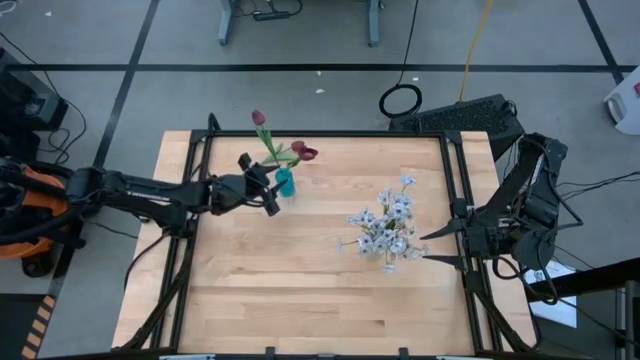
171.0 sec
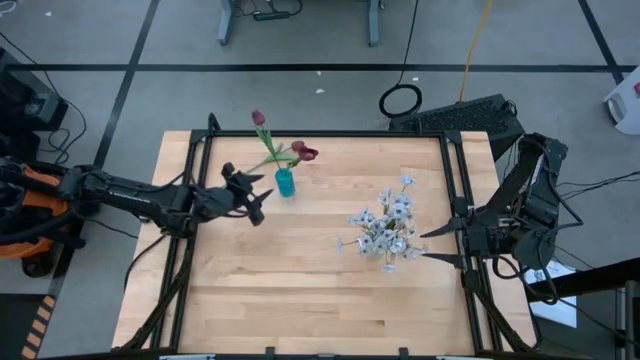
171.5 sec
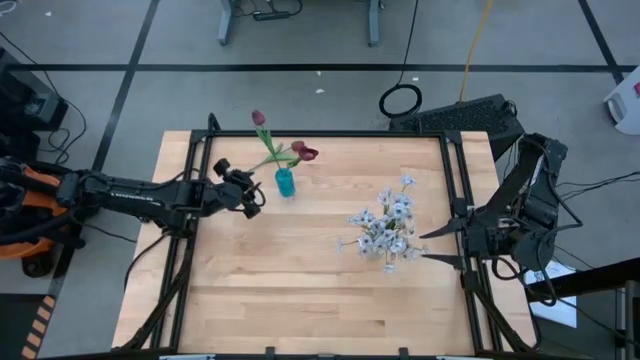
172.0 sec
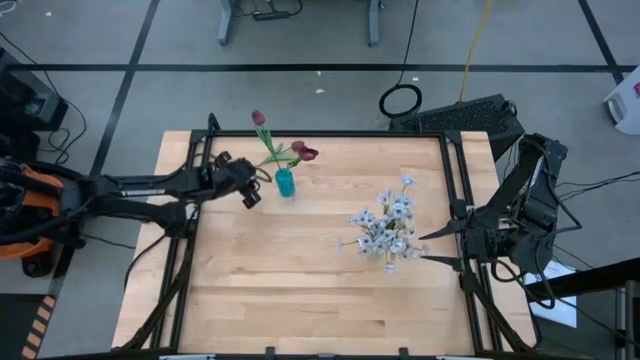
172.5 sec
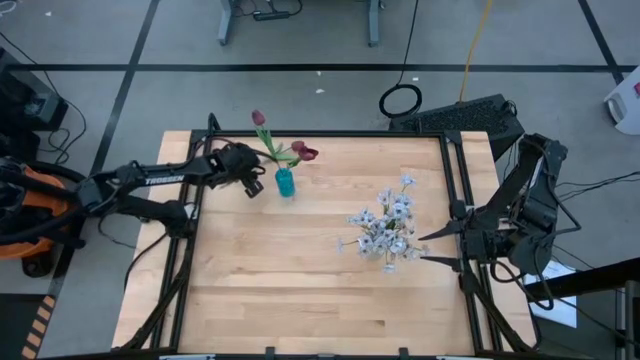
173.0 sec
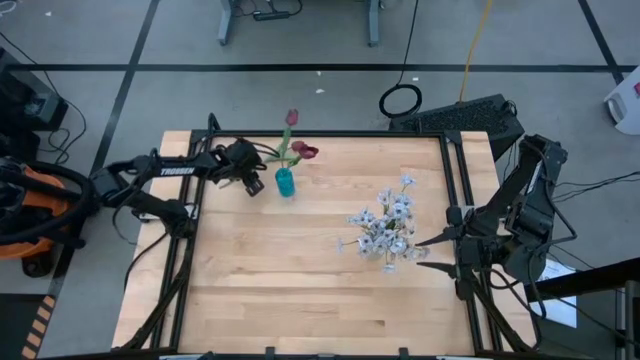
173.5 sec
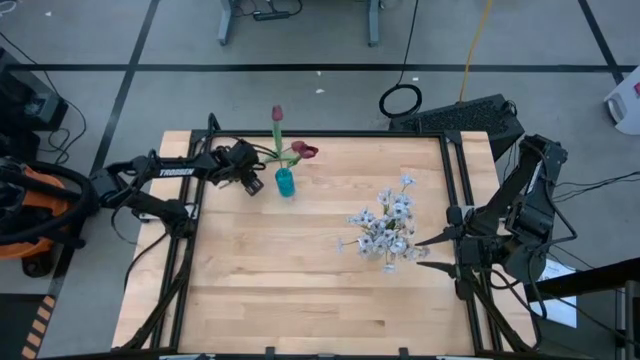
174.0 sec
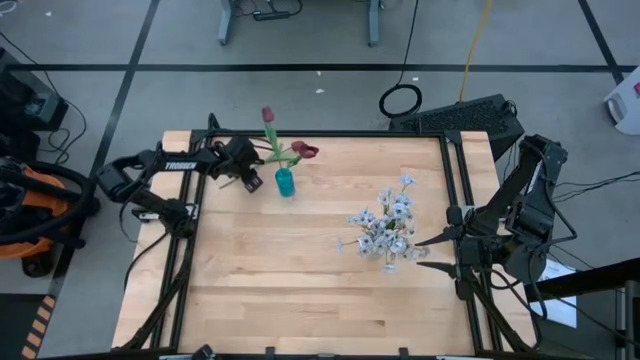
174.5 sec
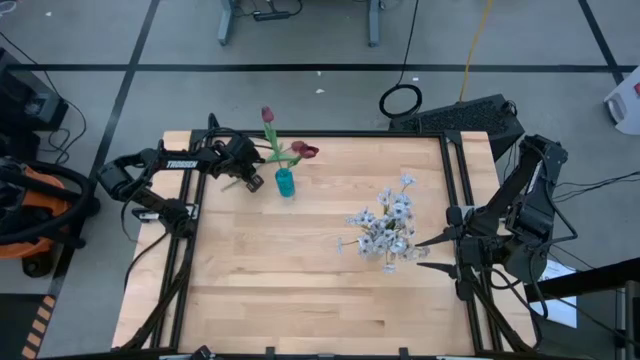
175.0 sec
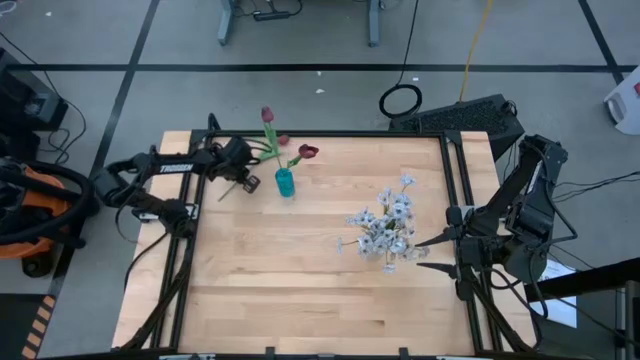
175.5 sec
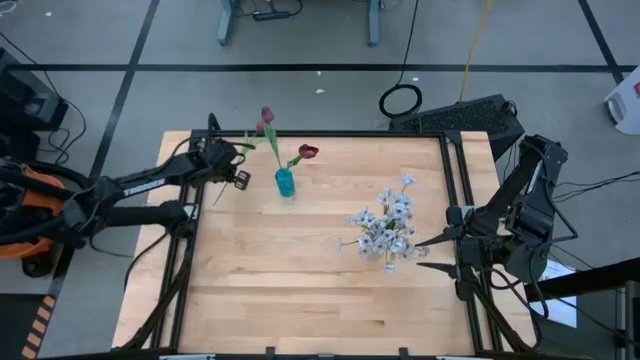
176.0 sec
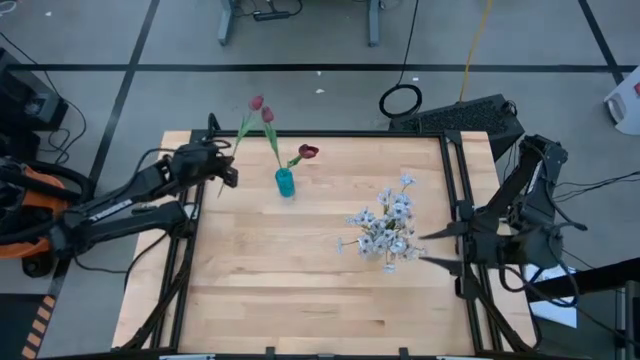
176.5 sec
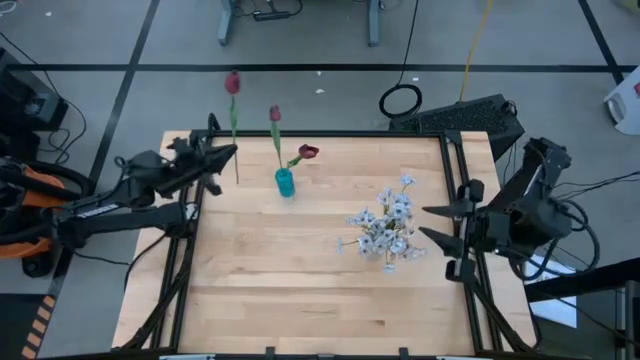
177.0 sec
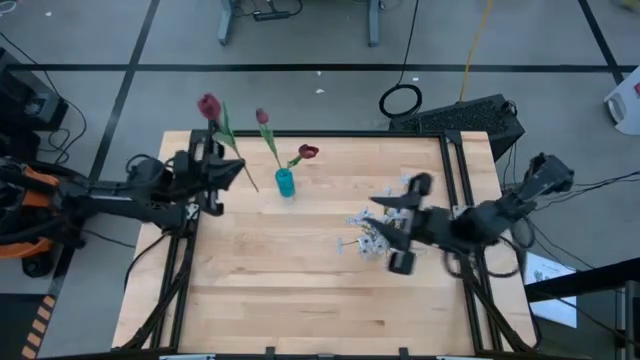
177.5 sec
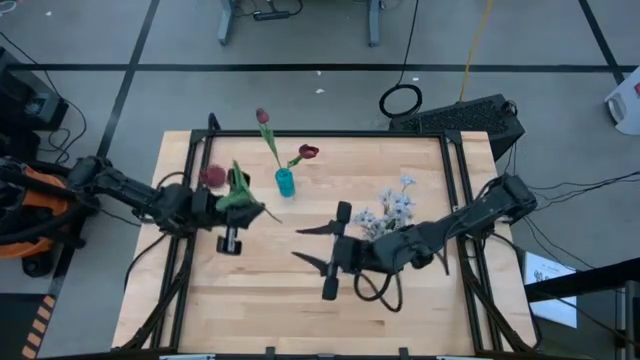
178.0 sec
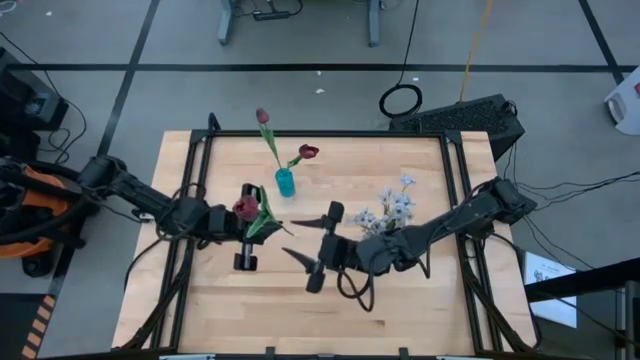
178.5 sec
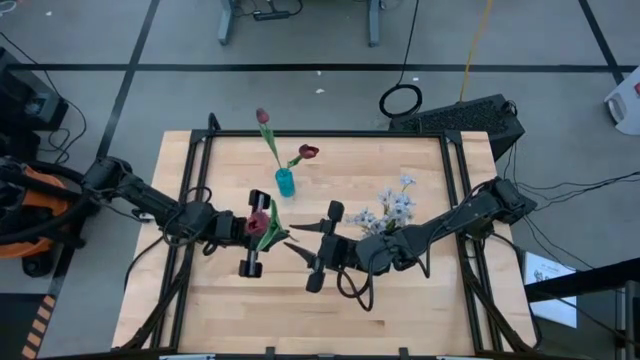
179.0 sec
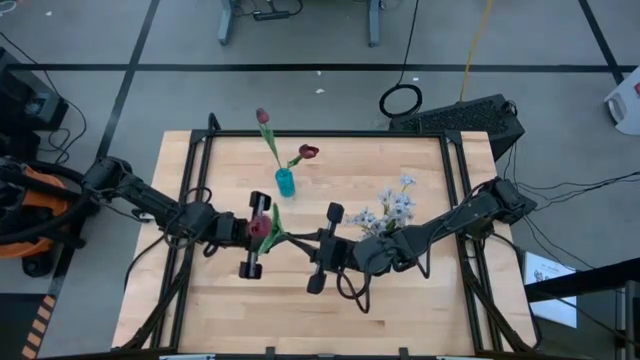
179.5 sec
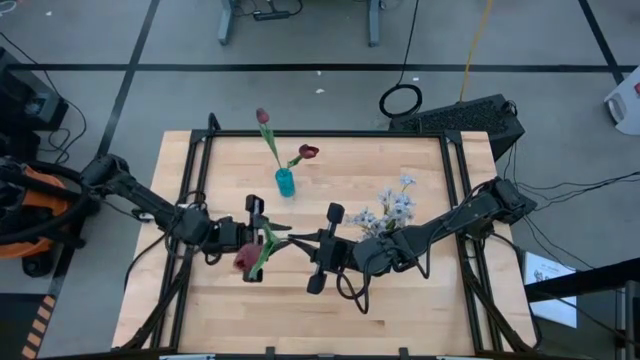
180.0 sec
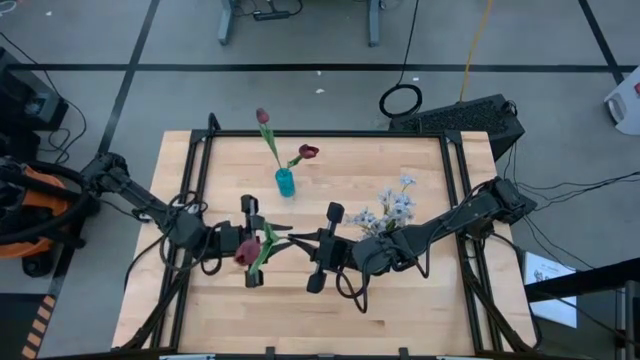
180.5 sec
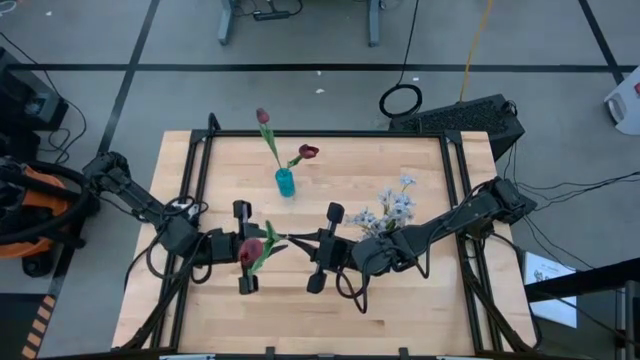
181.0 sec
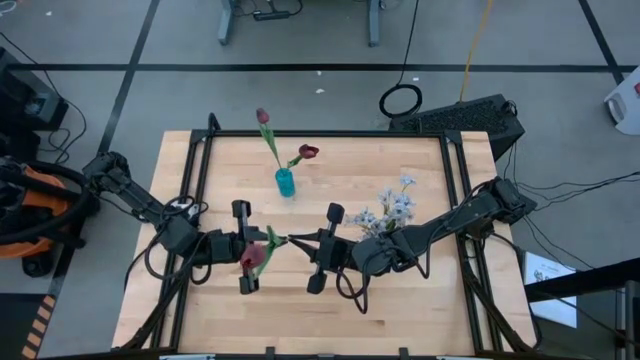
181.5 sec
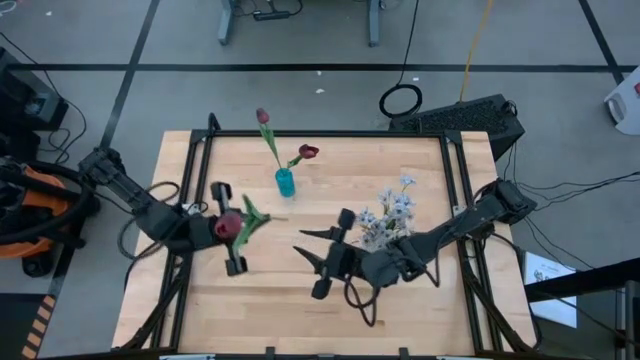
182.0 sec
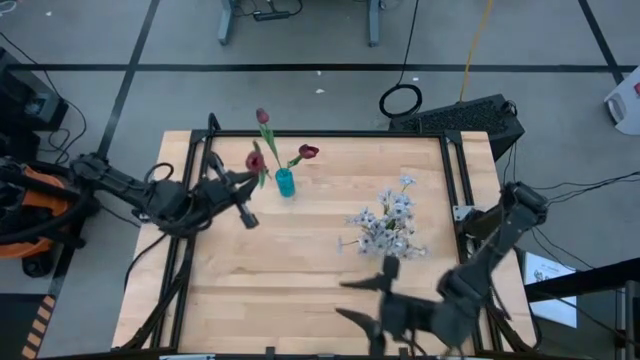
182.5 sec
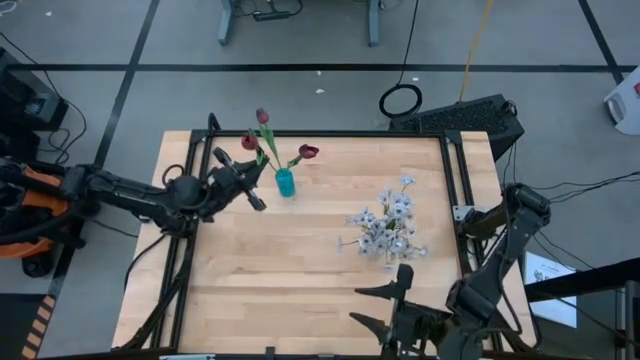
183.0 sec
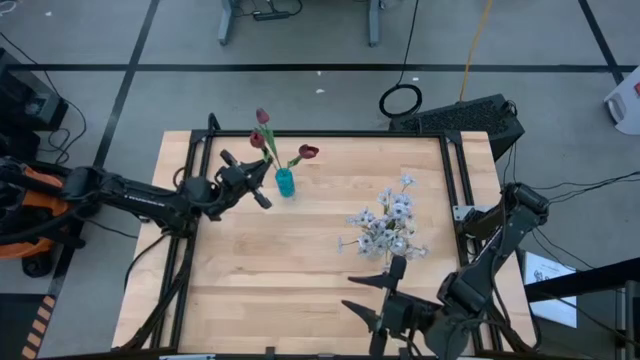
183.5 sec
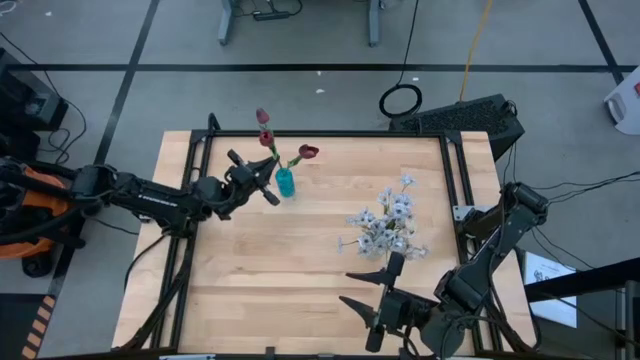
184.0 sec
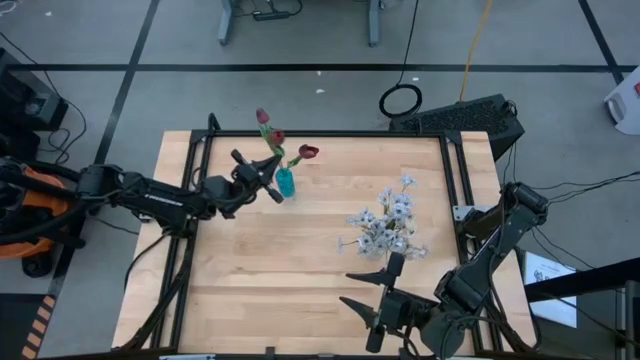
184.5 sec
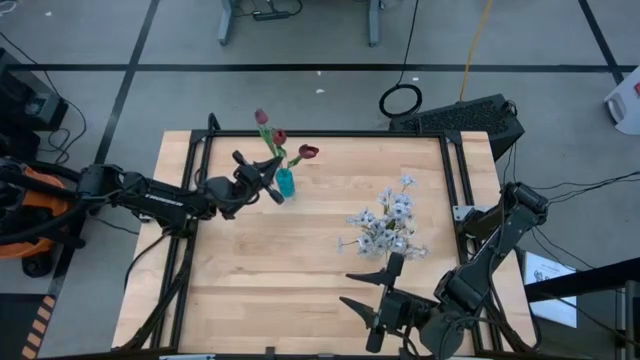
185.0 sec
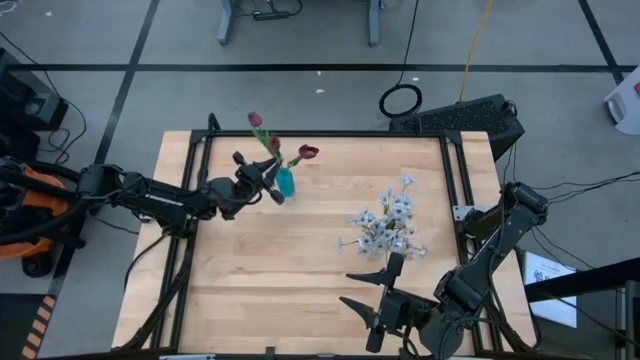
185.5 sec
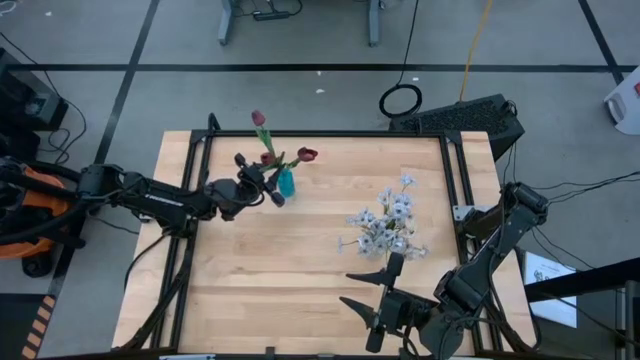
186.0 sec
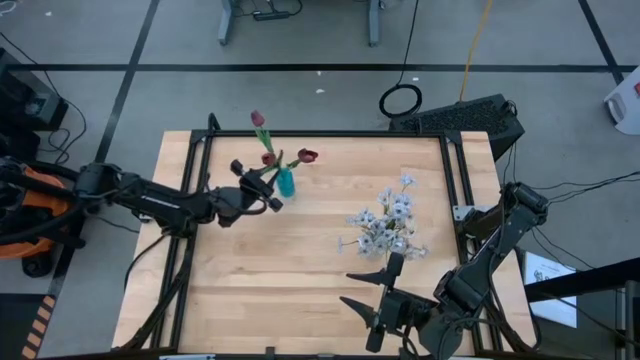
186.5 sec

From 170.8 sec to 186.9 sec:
Task: Sort flowers into vase by color
Put the red tulip into the blue vase

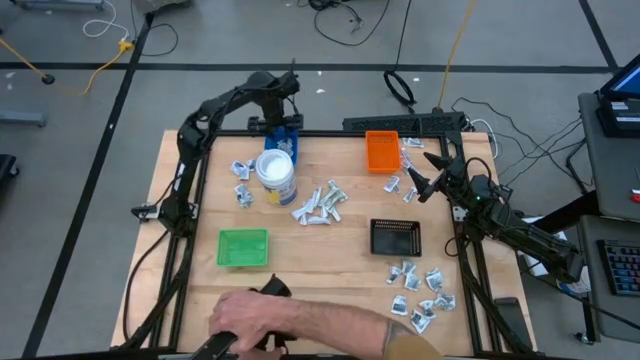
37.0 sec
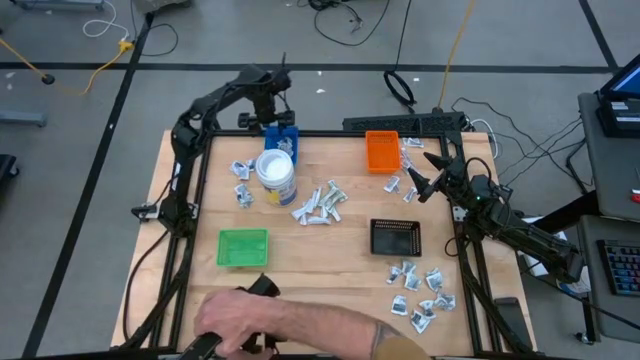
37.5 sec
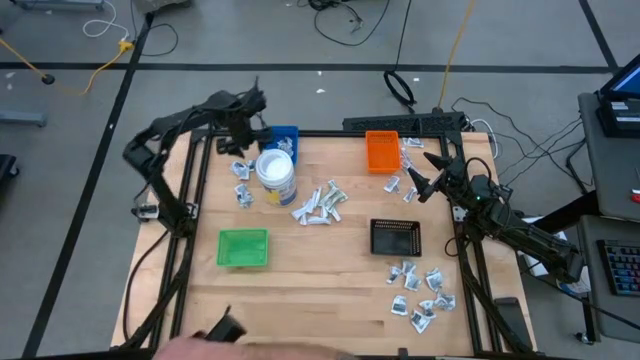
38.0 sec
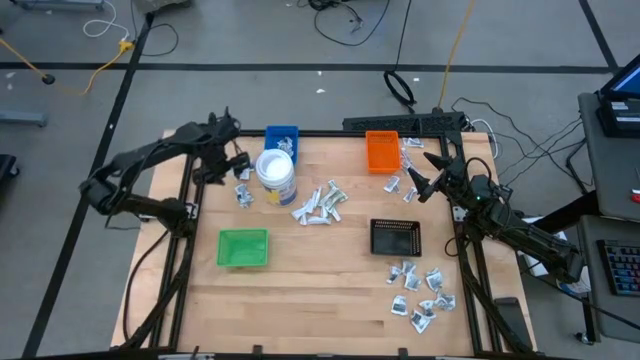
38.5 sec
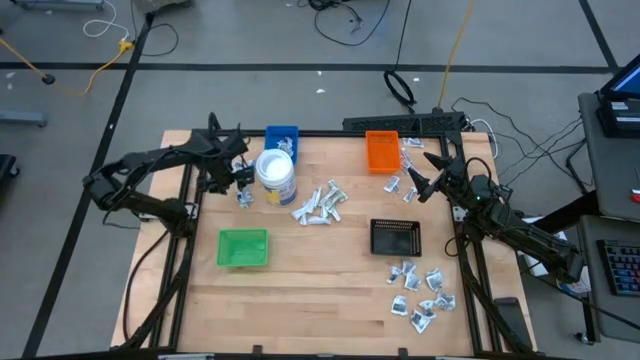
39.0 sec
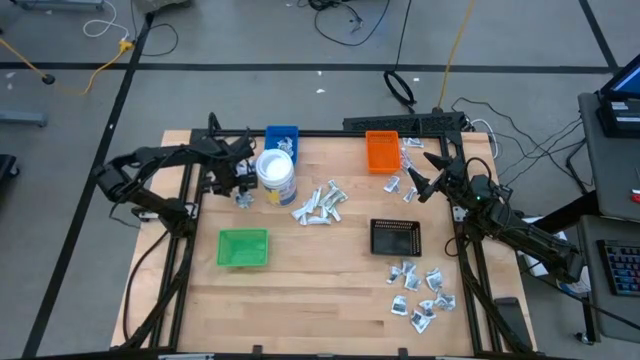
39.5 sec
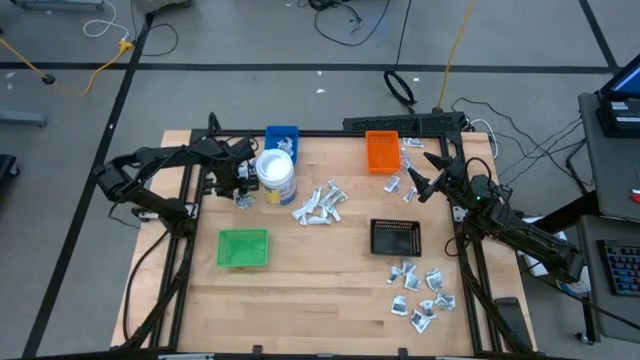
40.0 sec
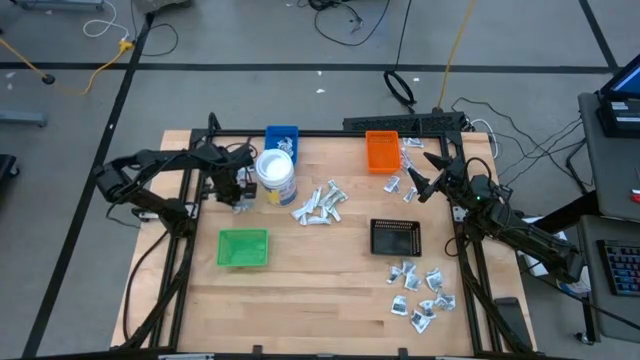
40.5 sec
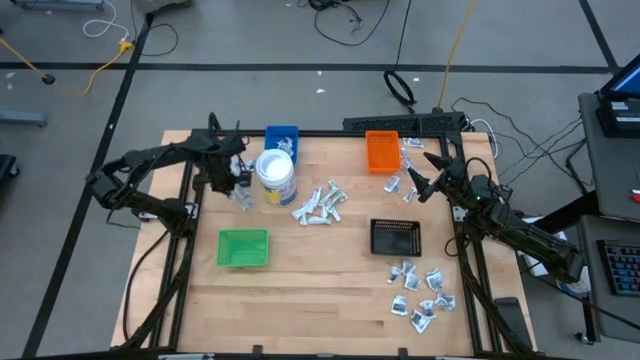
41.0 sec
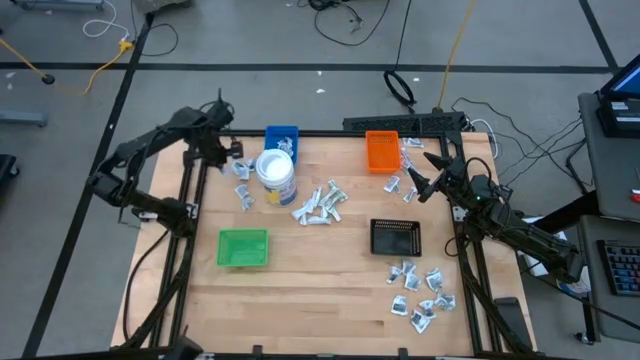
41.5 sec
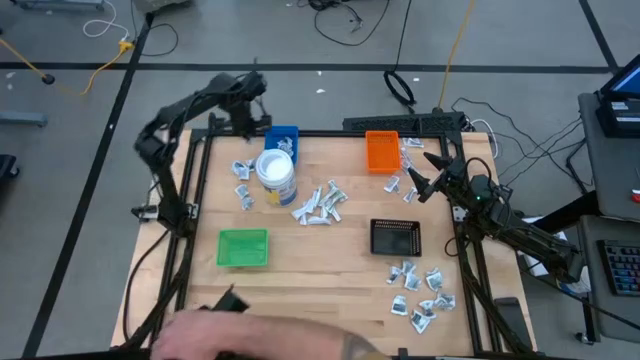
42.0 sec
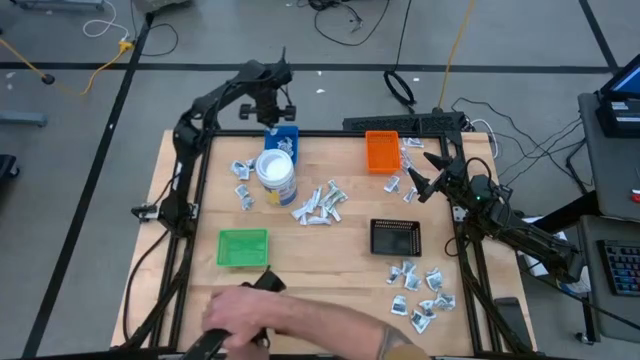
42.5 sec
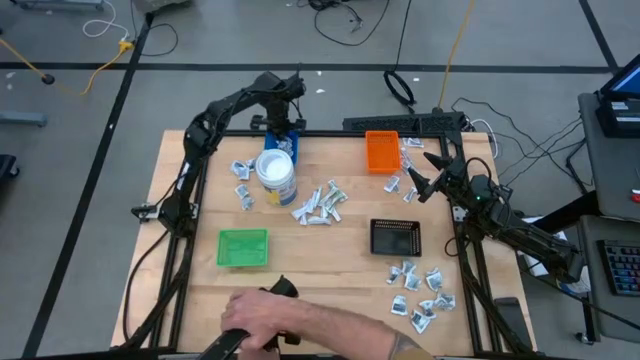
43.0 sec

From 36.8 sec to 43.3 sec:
Task: Pick & Place First Aid Supplies
Put the blue alcohol pad into the blue bin
